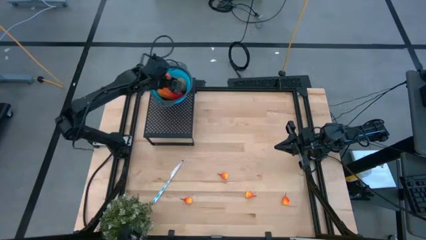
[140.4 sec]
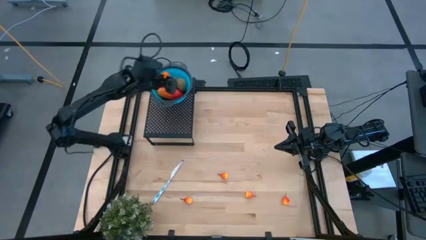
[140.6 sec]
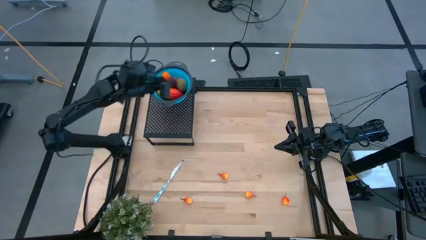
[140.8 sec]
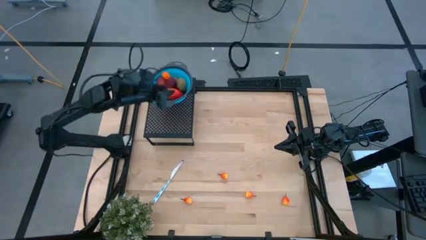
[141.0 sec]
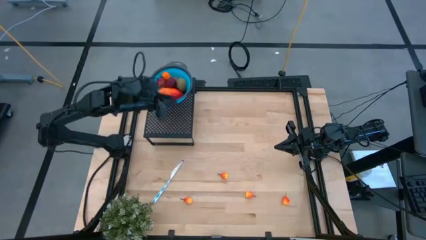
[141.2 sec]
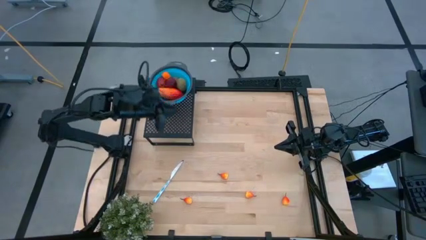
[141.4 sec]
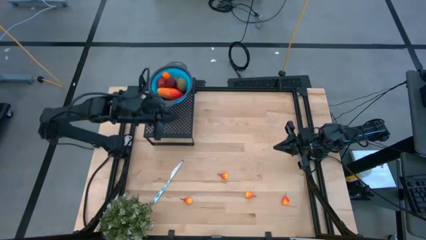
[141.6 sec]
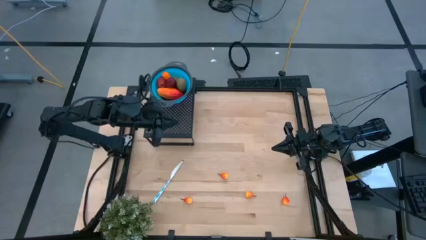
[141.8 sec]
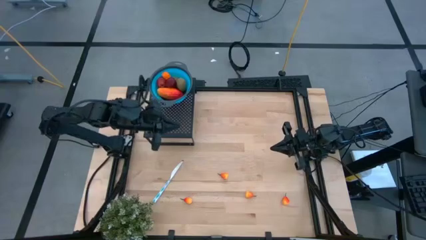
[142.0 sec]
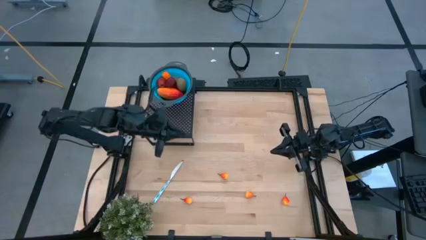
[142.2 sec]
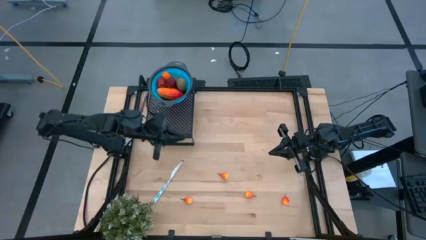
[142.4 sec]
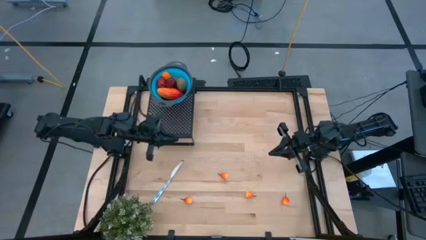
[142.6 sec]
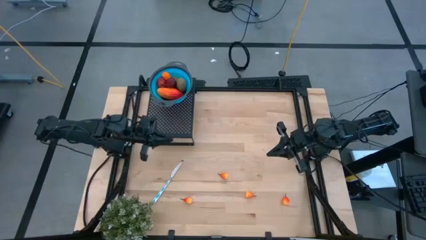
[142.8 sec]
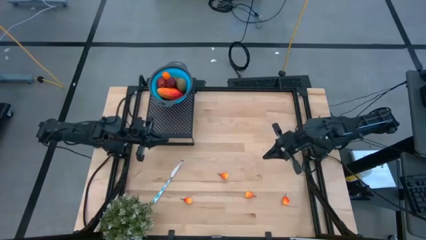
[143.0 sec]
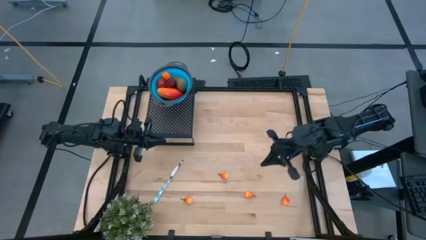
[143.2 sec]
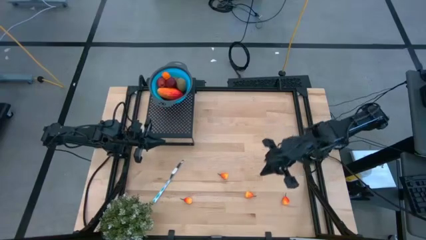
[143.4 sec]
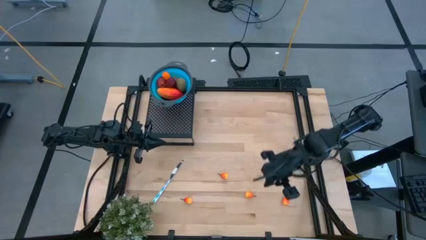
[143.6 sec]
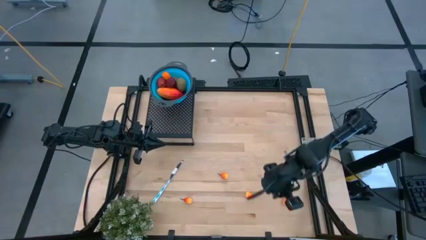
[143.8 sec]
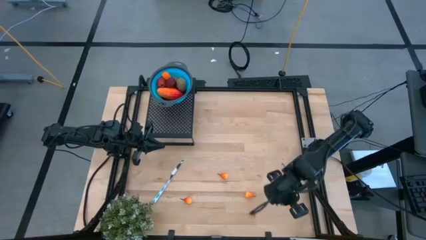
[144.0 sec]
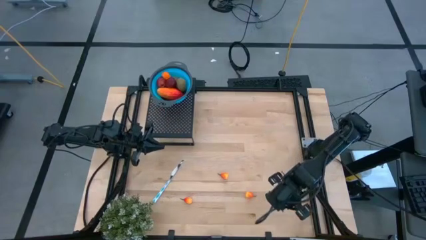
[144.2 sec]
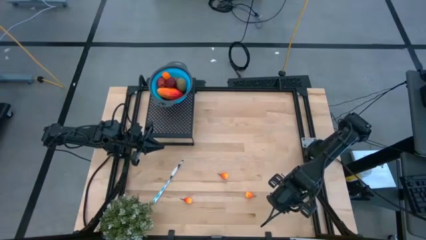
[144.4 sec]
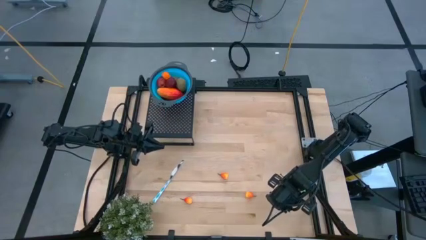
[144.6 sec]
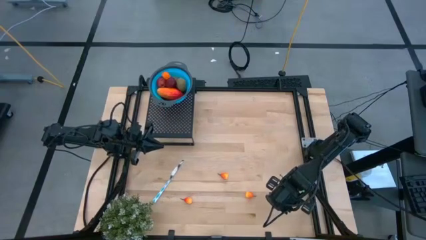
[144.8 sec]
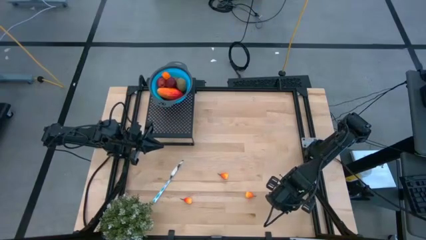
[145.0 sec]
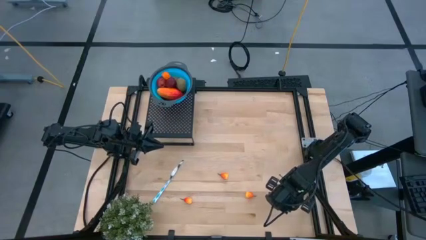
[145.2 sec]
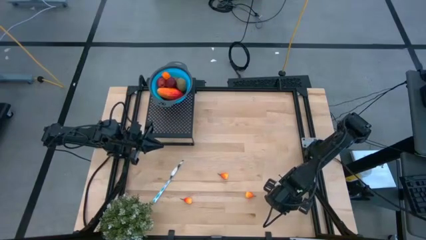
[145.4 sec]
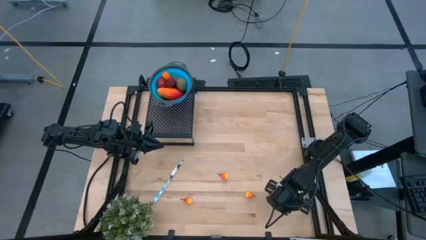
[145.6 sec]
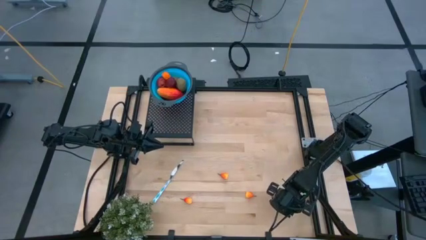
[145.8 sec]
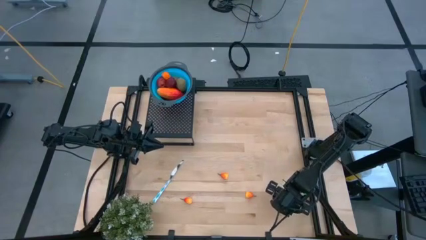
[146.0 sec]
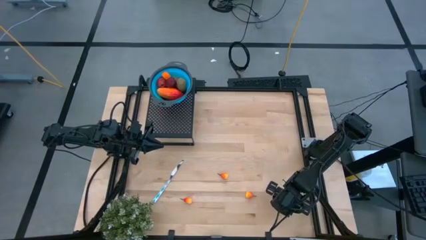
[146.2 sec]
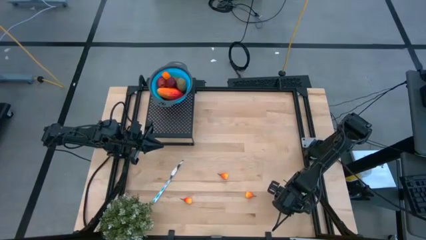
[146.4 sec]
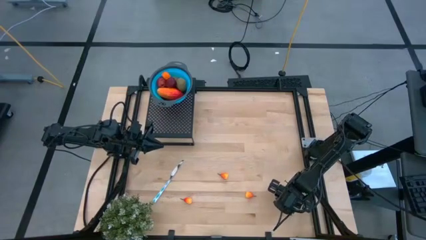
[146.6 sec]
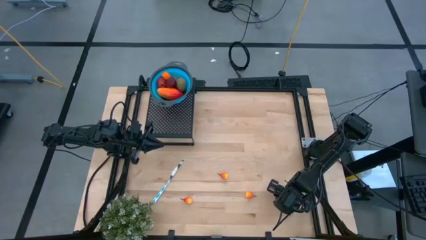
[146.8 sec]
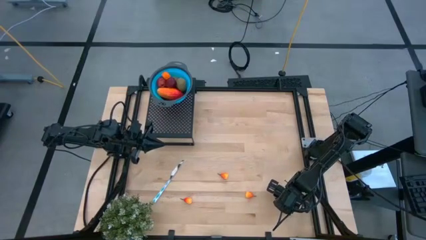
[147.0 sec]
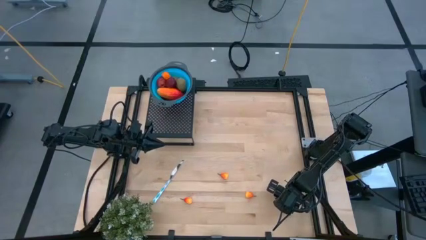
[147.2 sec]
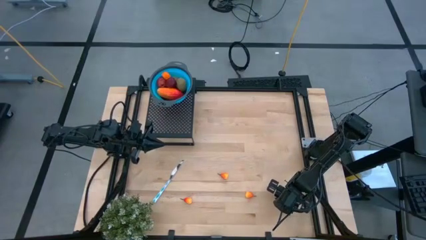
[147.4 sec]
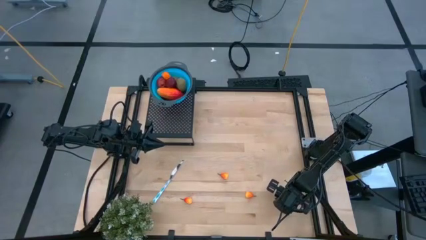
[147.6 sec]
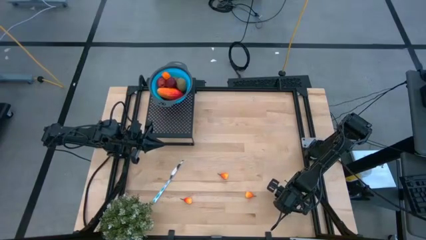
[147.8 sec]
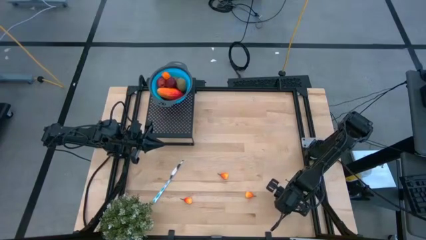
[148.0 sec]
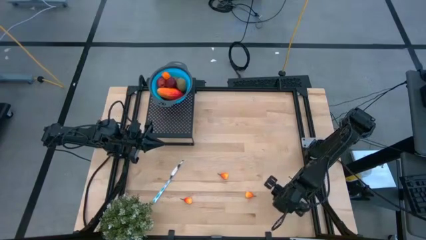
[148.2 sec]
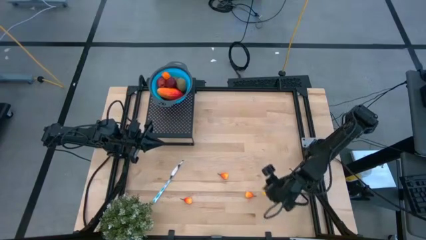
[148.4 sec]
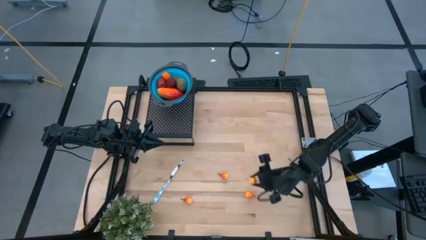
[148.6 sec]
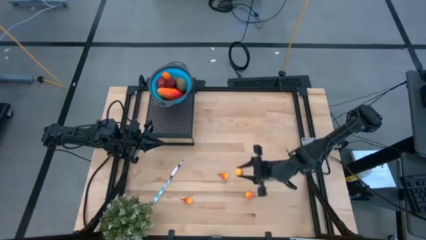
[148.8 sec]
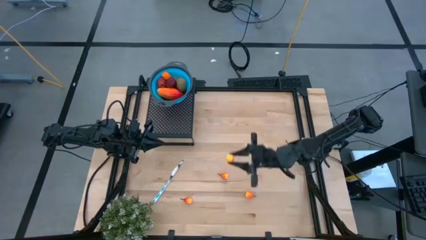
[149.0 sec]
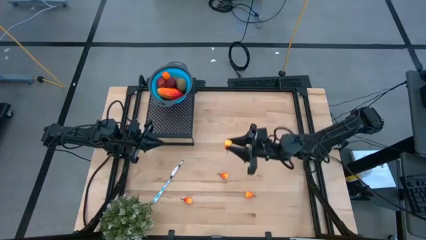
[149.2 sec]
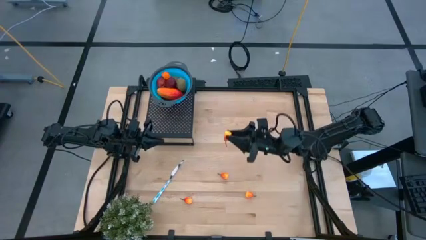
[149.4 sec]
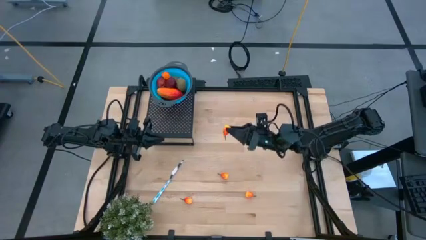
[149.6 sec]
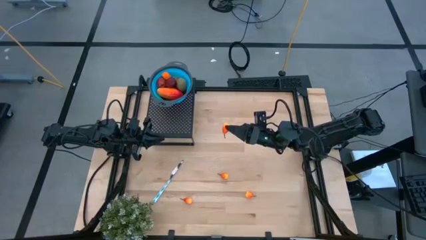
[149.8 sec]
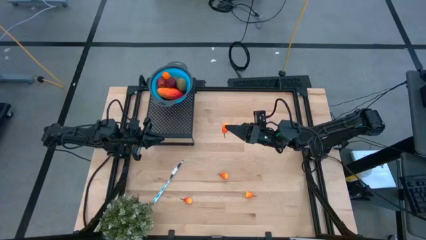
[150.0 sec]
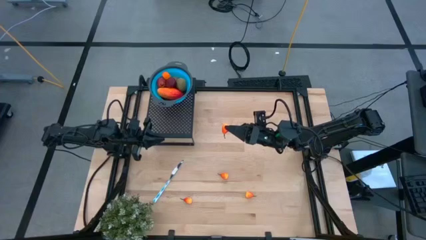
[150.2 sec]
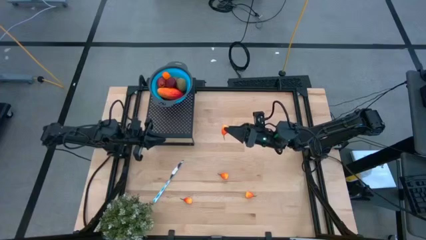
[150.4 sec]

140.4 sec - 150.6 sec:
Task: Pick & Place Fruit
Put the orange pear into the blue strainer bowl on the shelf

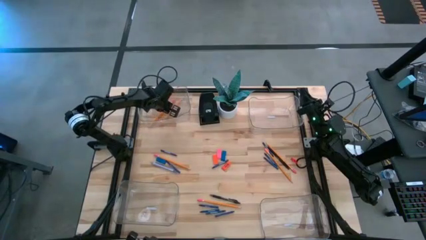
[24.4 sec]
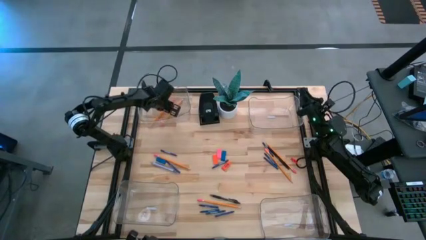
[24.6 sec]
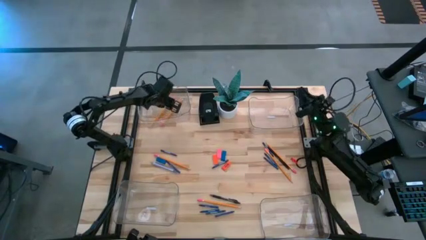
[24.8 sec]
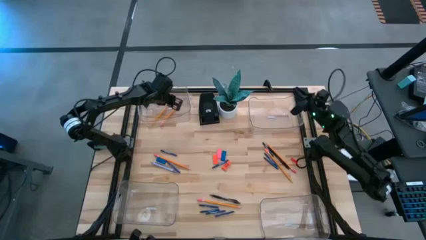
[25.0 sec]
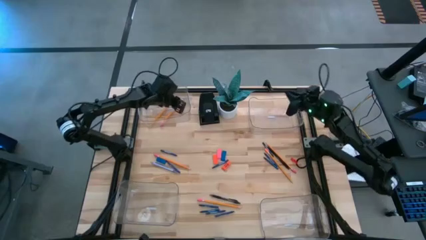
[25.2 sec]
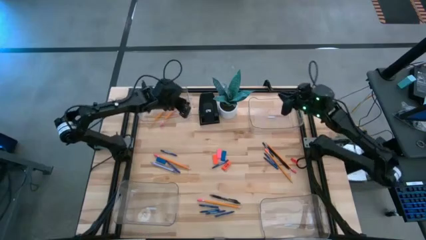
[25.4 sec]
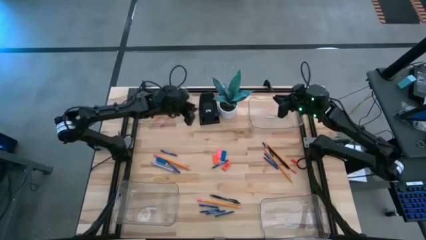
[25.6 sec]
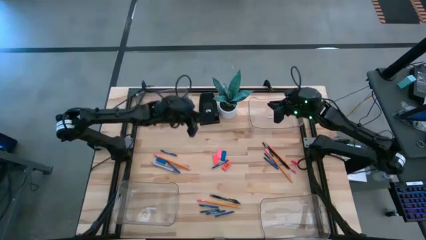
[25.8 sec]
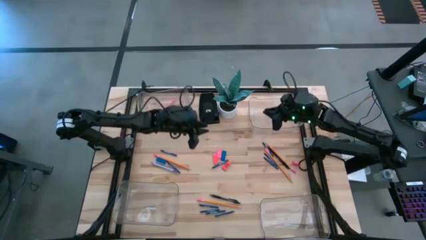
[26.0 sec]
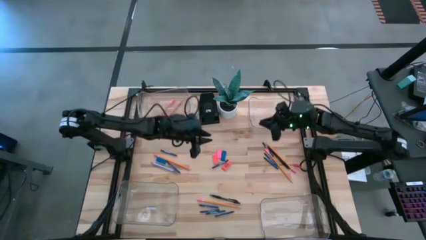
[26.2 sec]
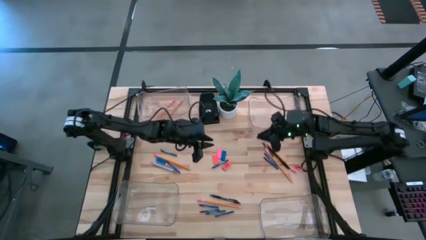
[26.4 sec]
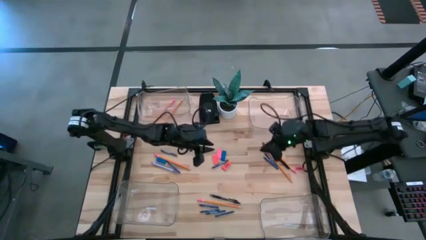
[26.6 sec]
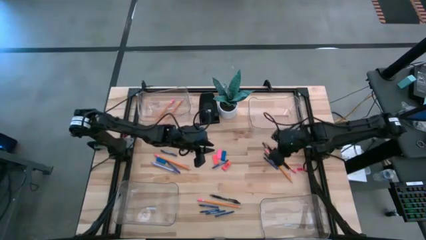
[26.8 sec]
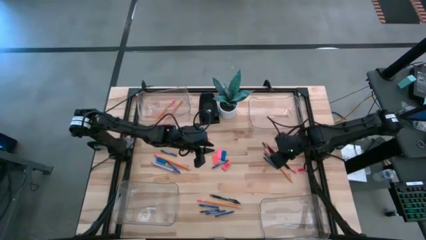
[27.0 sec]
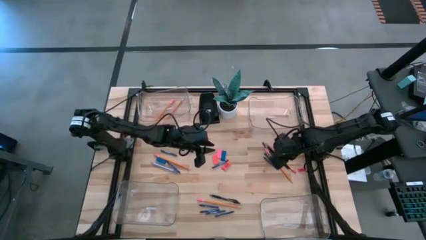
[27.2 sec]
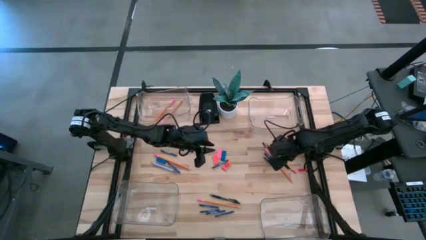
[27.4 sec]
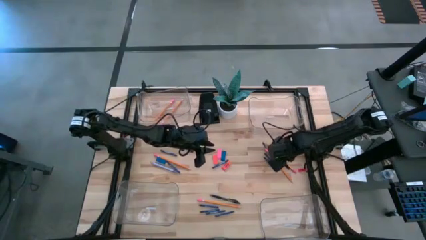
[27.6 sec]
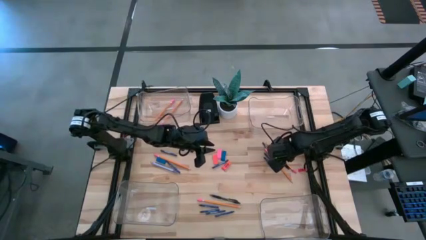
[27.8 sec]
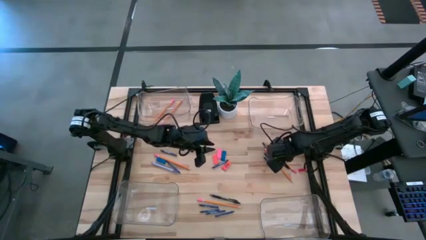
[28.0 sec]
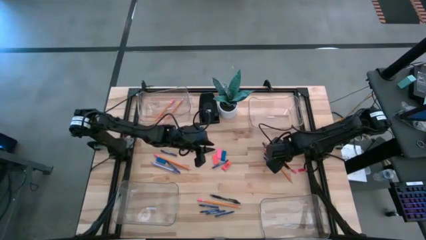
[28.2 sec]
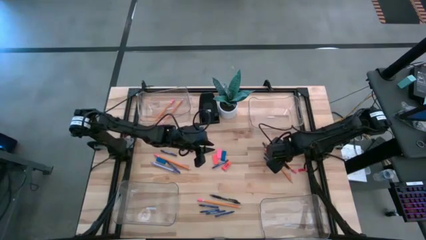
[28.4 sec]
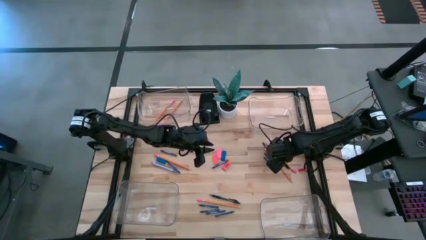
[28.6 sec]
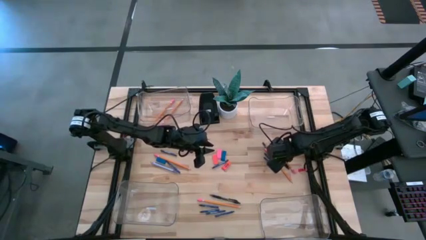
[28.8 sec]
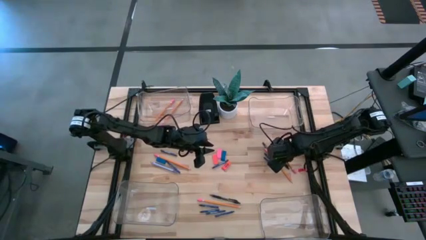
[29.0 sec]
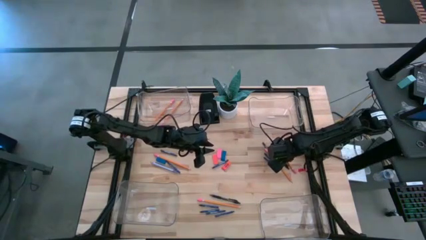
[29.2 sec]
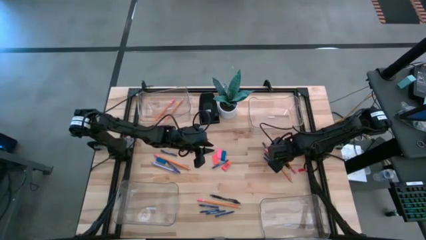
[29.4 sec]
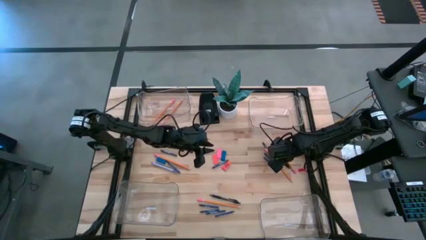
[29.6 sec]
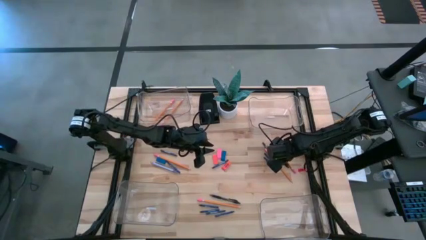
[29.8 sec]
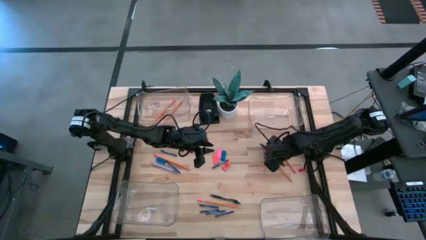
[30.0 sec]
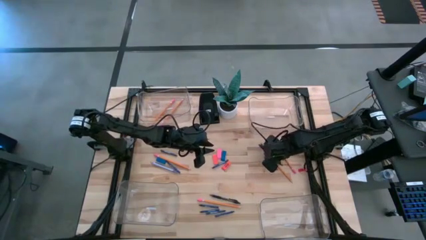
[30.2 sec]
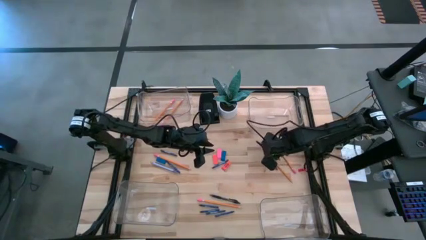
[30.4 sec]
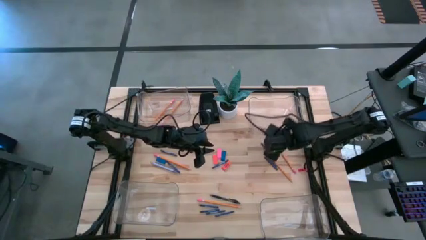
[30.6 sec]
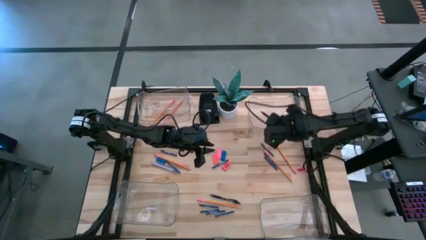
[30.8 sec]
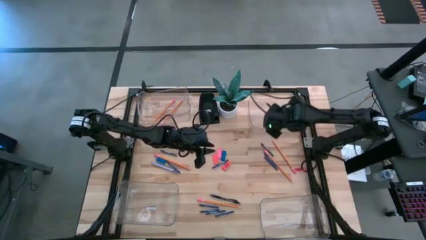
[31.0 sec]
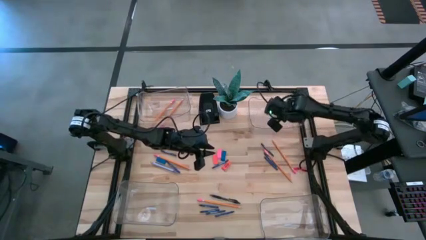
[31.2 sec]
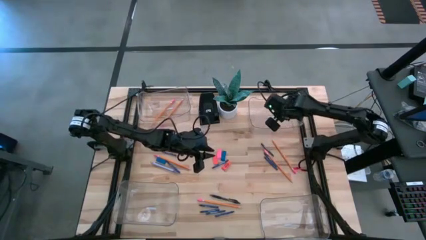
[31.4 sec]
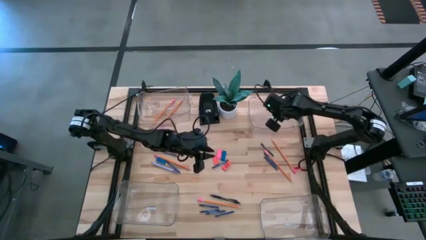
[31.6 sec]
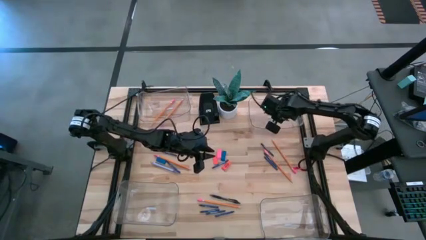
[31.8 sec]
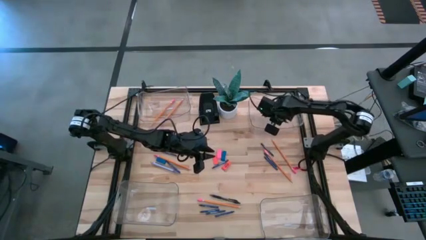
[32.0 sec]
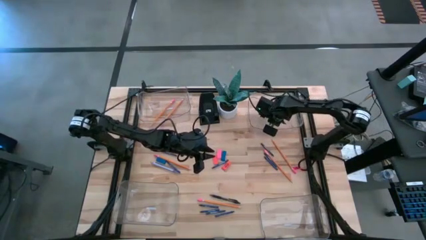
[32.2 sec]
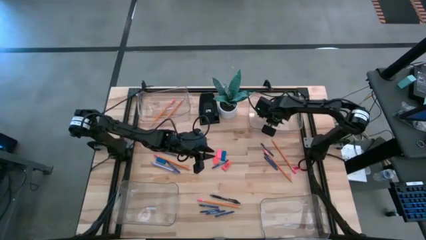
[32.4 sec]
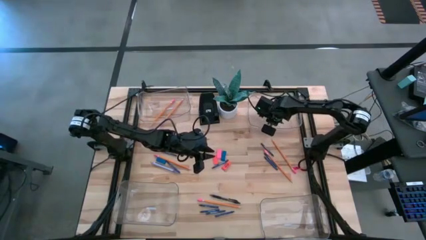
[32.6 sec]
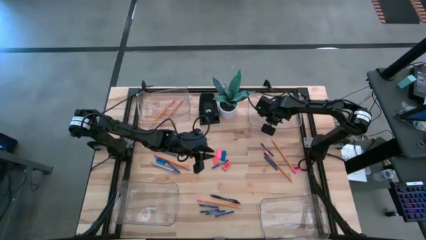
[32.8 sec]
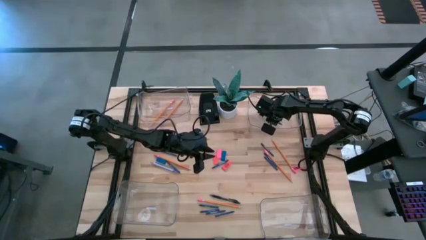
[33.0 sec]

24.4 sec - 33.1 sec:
Task: Sort crayons/erasers/pens/pencils in bins
Put the black pen into the top right transparent bin
